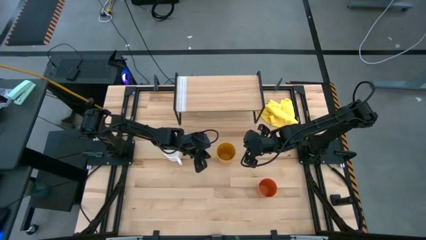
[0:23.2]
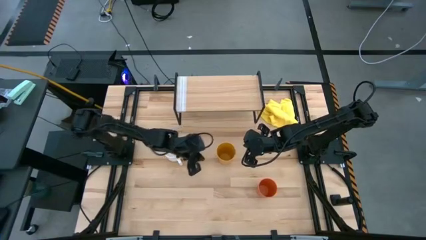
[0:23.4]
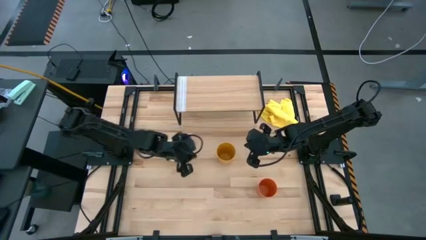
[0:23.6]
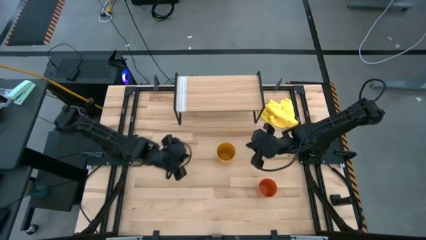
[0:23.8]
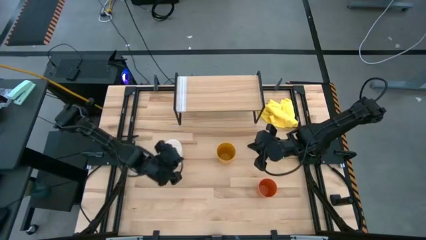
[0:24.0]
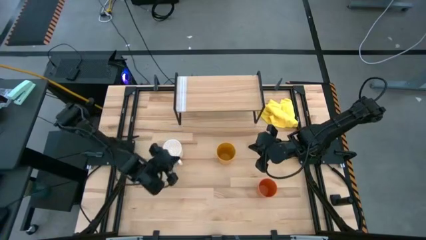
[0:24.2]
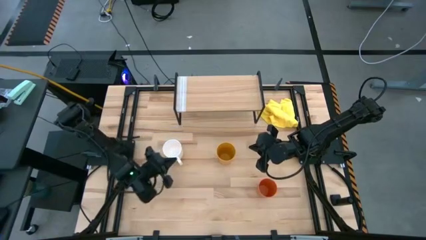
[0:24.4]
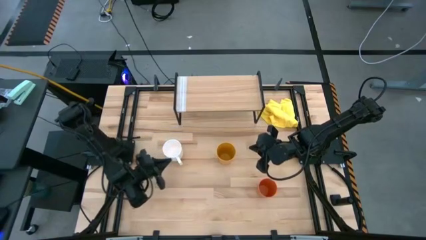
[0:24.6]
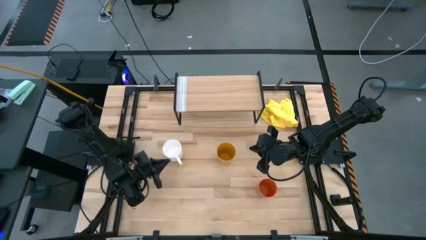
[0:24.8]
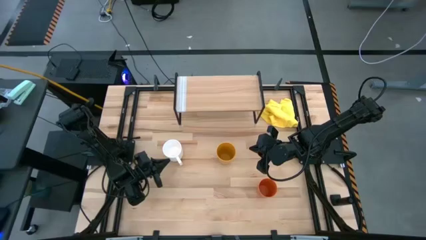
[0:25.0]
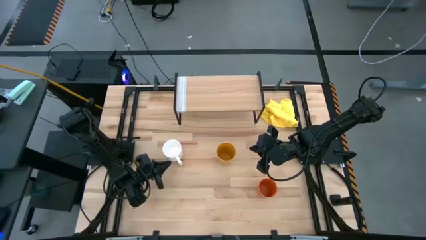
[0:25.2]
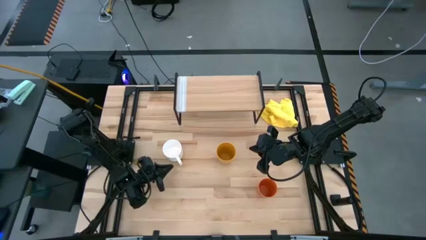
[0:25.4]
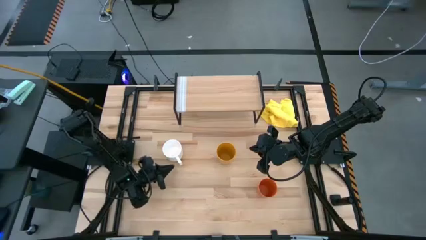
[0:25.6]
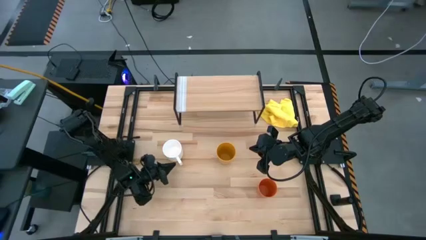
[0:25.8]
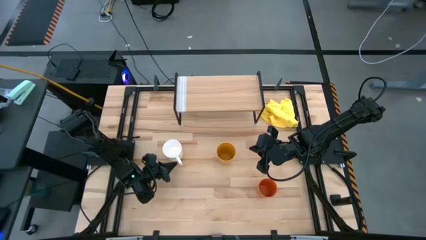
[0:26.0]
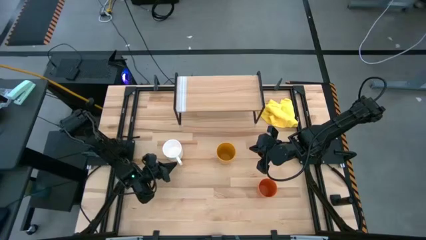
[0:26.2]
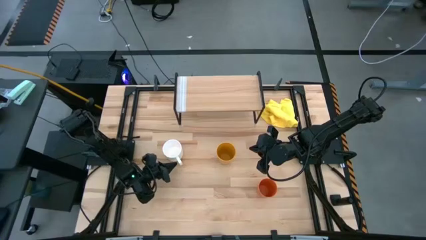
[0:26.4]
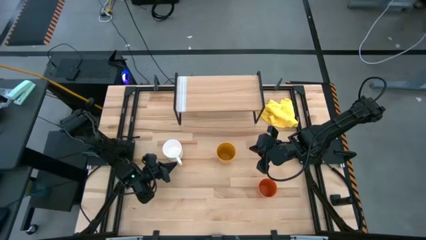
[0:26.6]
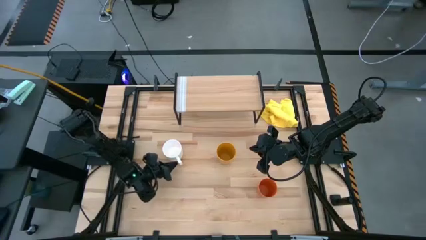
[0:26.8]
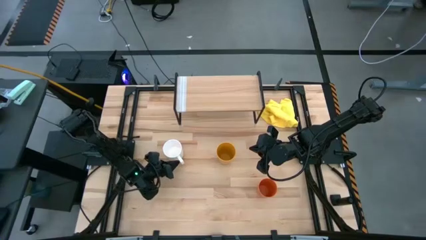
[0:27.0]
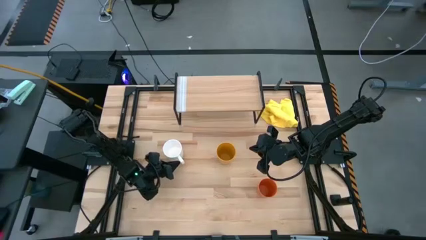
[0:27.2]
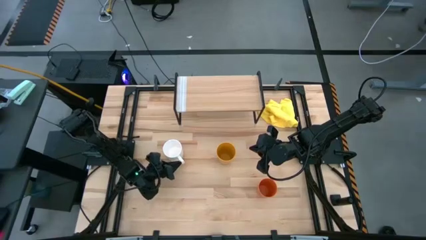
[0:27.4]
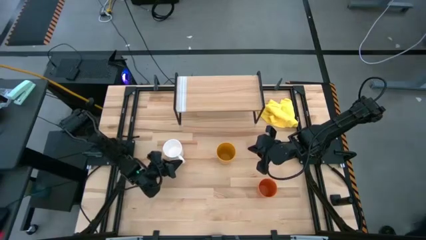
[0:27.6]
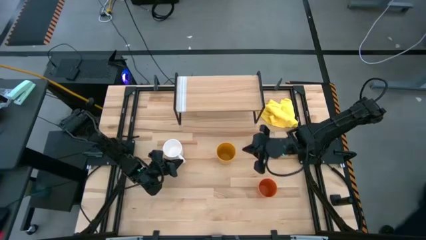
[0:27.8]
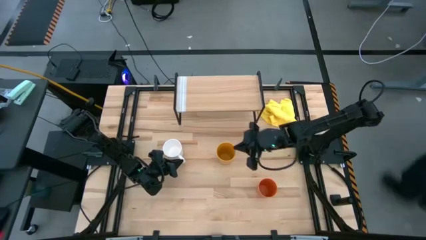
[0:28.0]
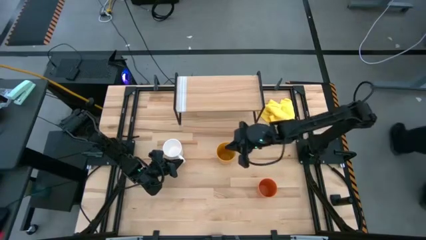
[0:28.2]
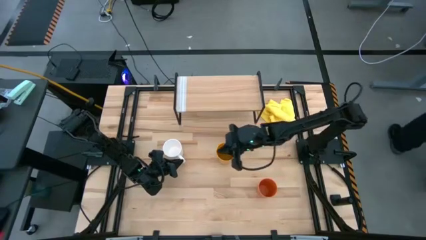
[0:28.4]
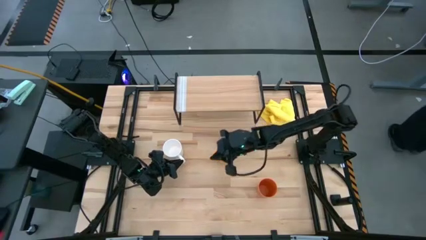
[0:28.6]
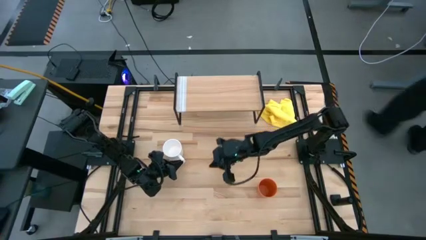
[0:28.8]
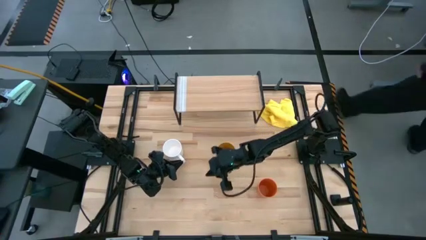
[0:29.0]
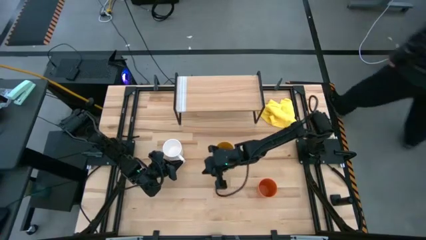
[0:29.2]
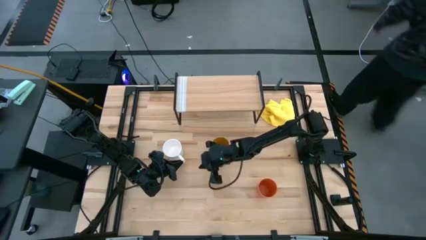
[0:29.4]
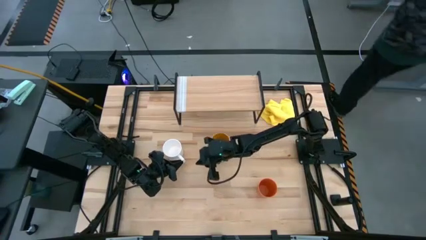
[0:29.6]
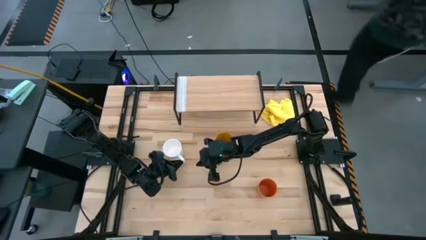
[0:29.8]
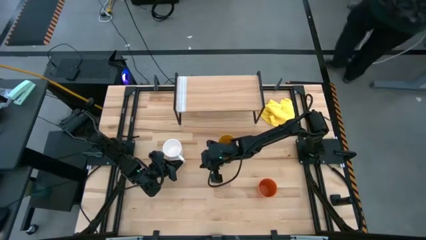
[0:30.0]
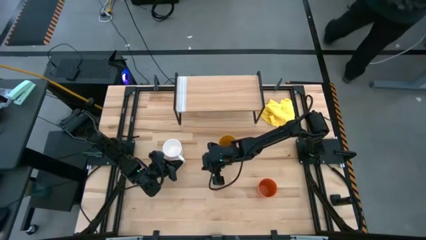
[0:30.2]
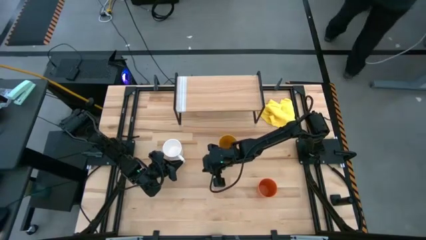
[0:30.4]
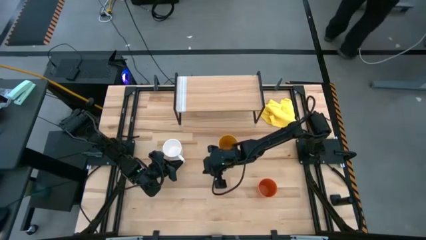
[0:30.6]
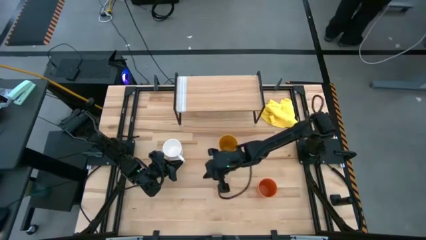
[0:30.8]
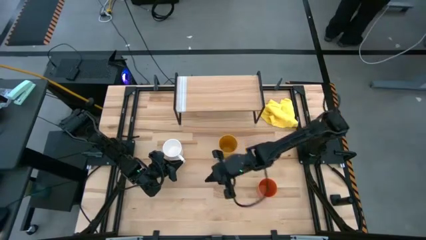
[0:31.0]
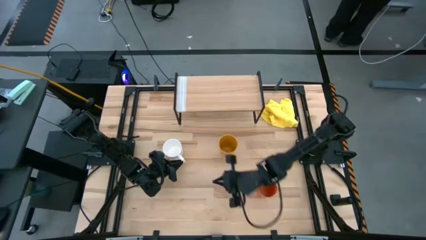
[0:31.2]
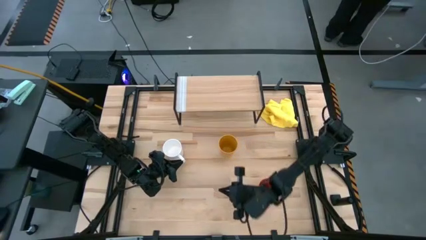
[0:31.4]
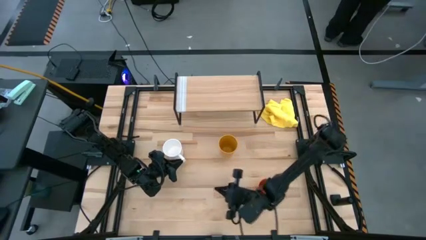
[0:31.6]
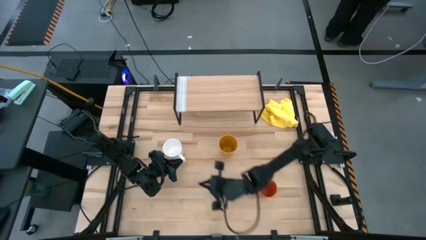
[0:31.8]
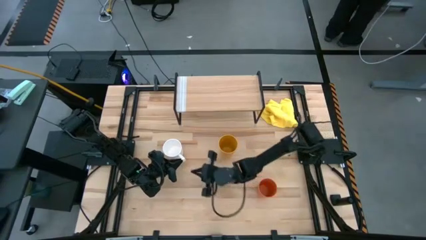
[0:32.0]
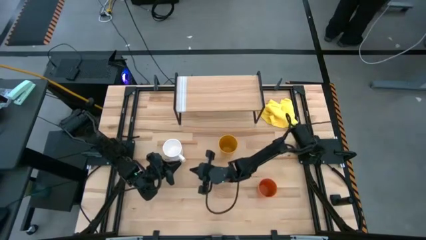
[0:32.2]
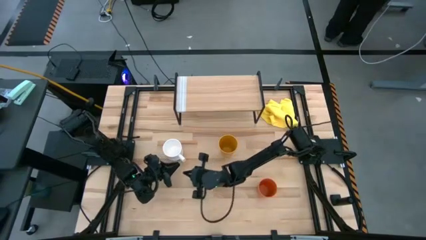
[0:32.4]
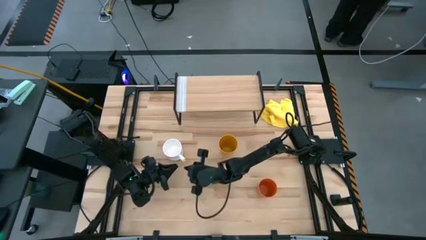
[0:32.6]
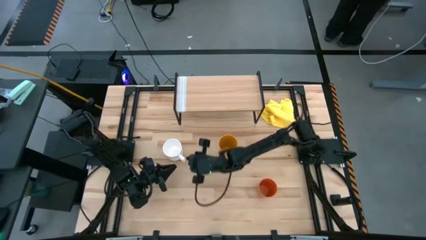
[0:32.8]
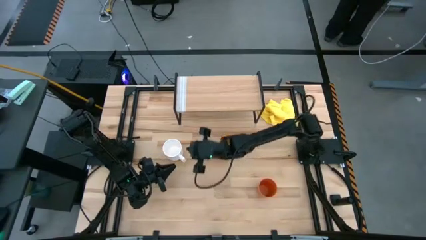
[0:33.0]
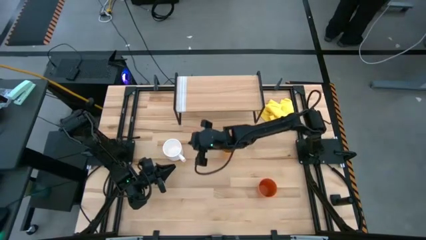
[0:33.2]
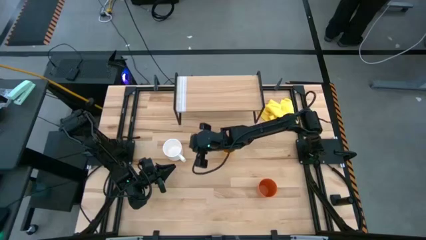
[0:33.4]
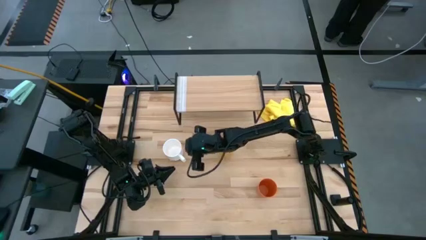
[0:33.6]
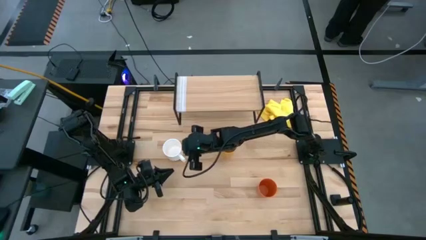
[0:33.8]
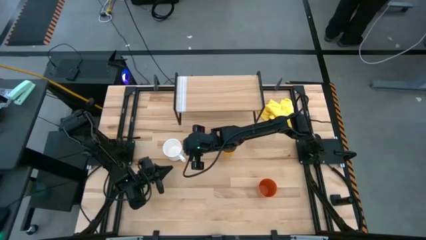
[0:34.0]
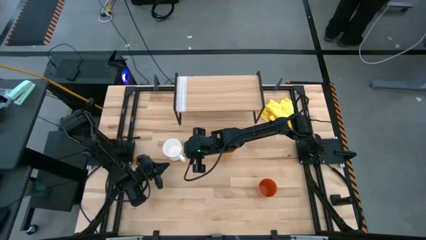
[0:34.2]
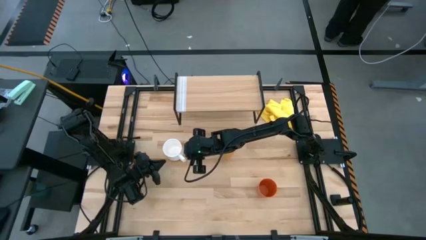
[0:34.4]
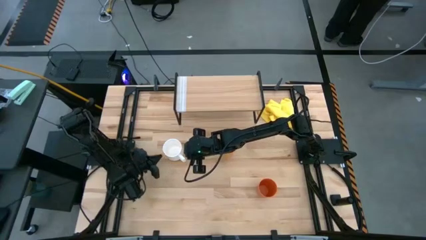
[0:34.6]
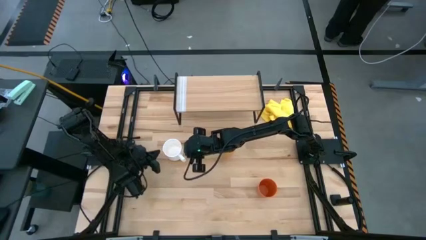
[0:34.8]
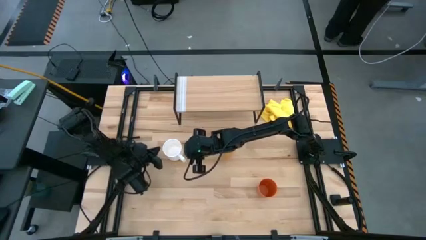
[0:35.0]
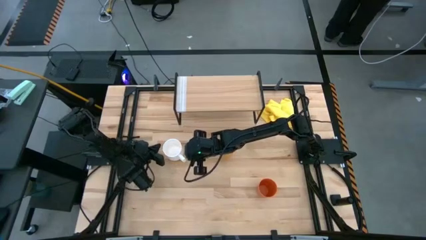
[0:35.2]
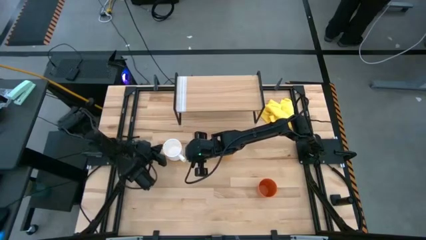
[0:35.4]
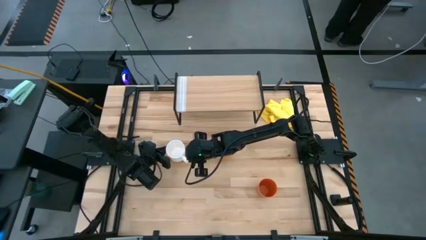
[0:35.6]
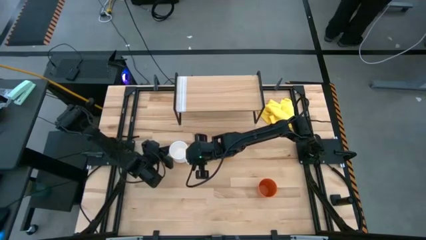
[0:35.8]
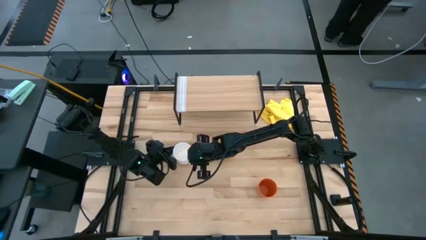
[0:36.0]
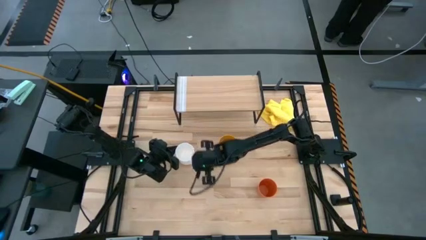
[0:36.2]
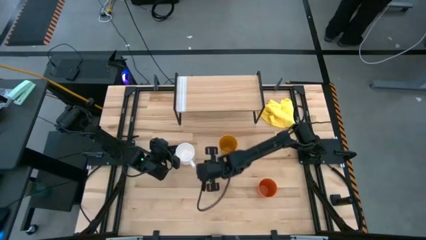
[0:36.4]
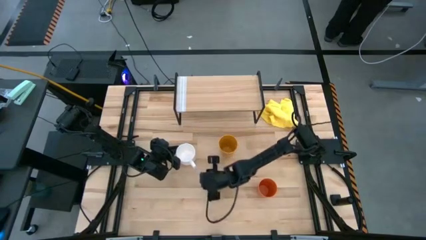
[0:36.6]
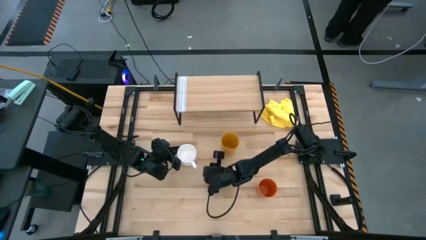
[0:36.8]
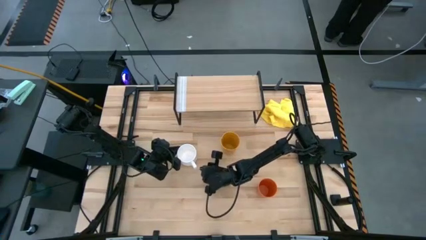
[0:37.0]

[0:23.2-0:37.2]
Task: Stack small to large cups/mugs on shelf
Put the white mug on the shelf
